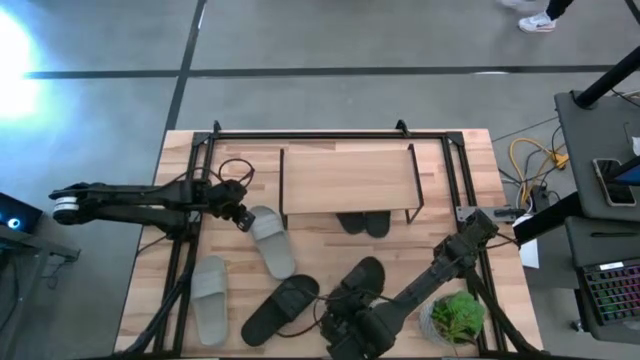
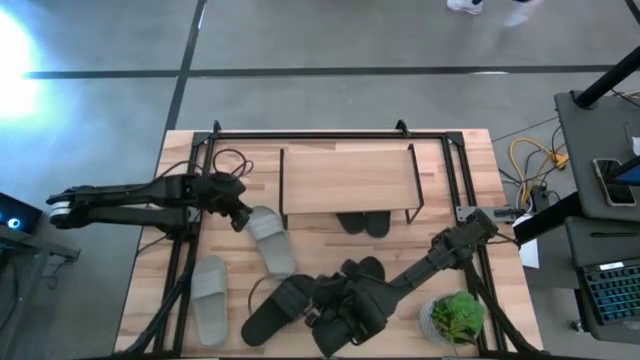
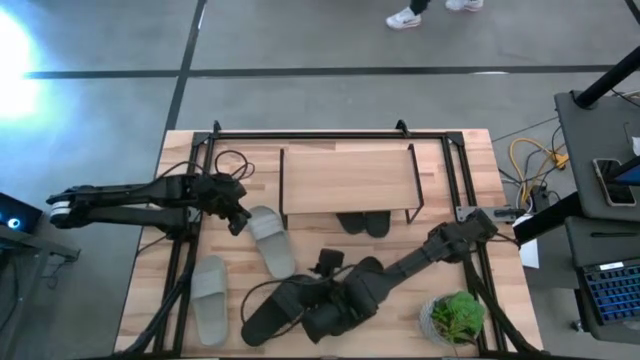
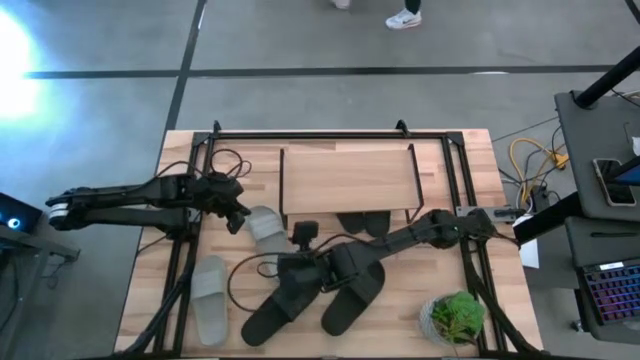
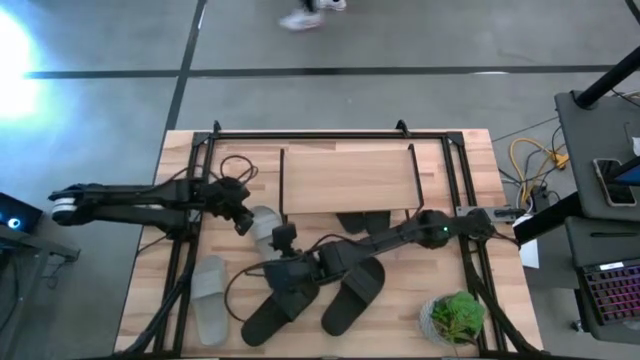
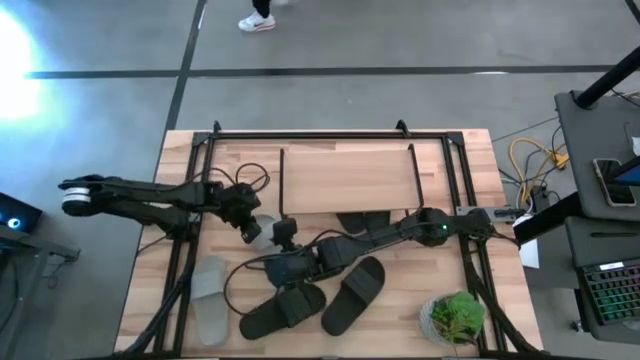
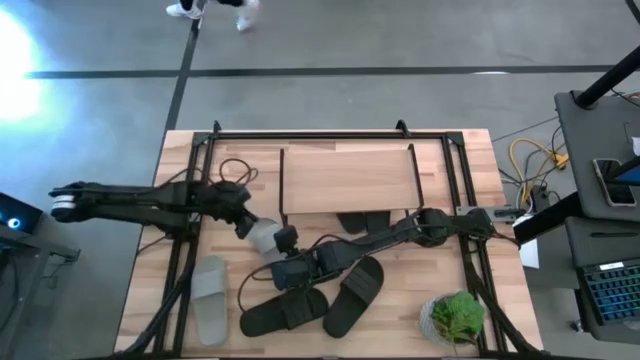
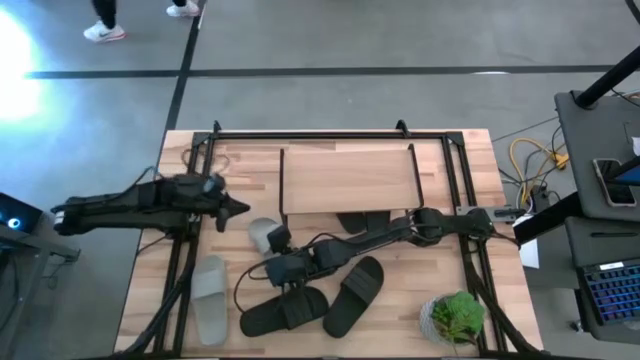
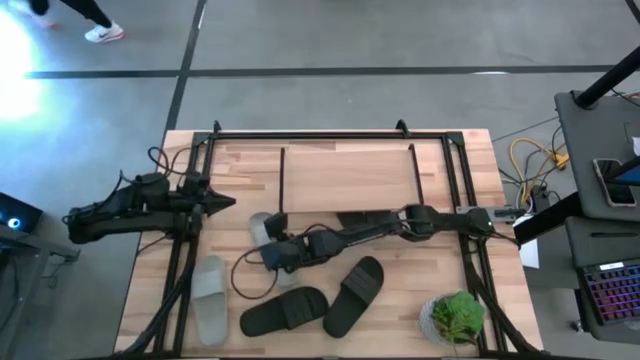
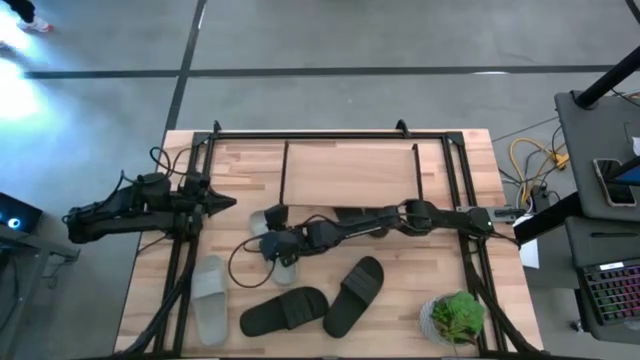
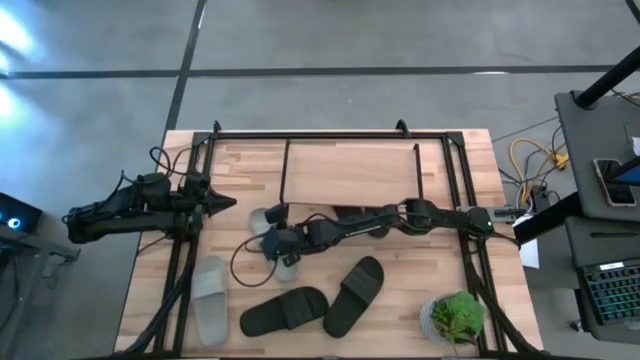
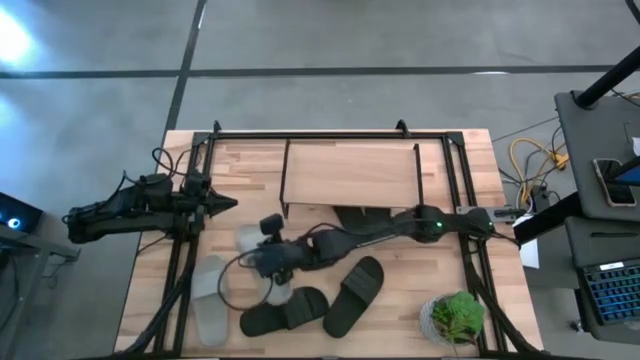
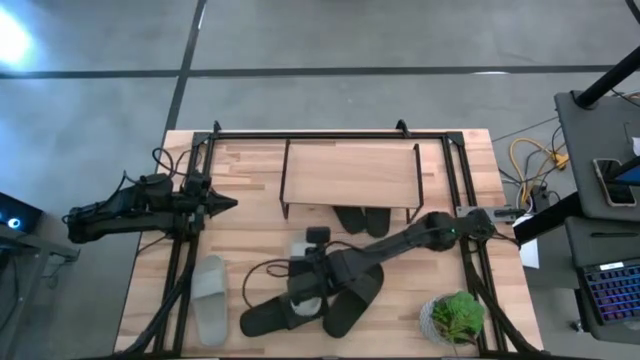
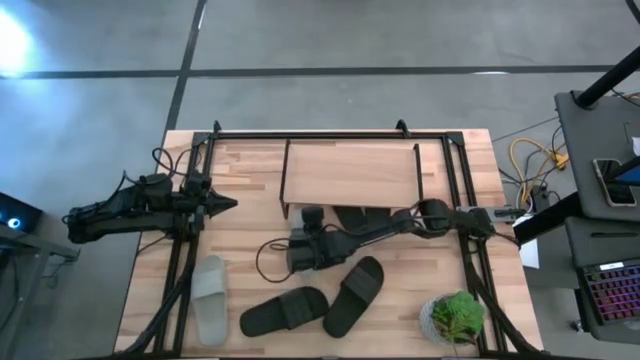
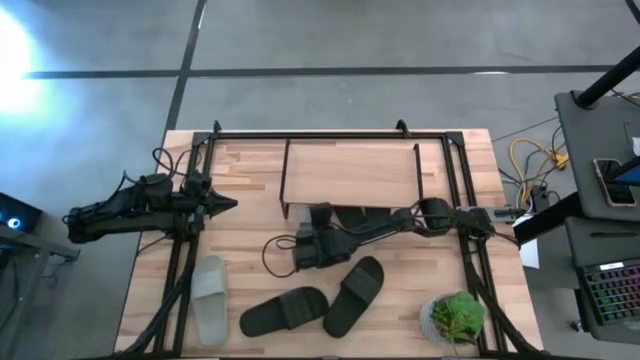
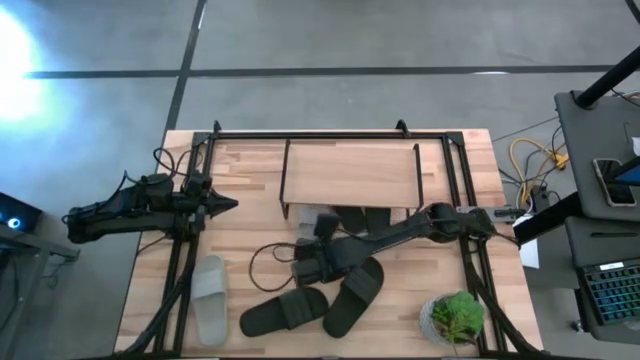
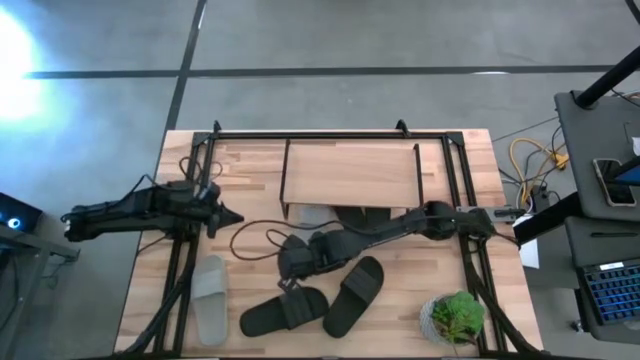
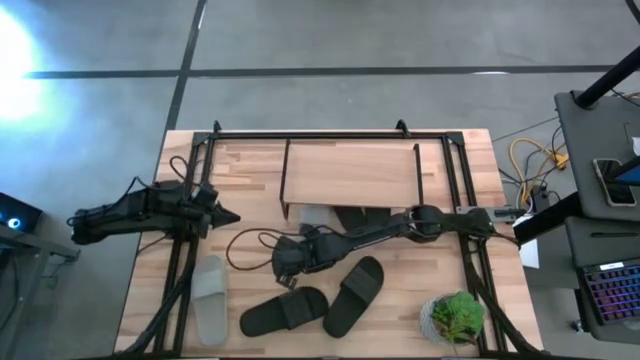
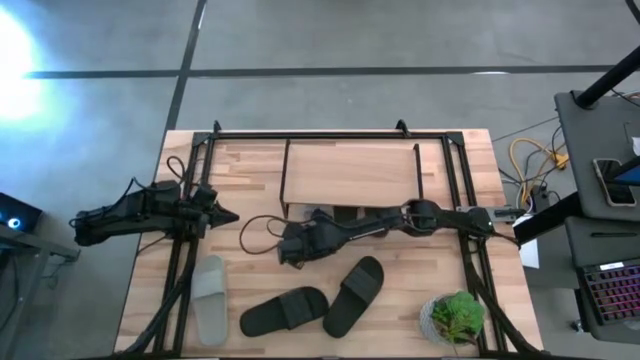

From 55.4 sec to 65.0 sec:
Task: Pick and place slides into the shelf
Put the gray slipper under the shelf

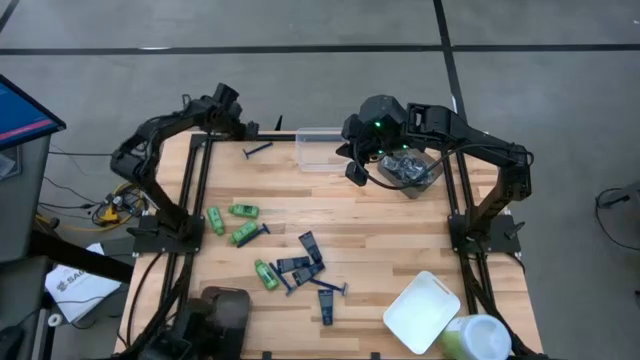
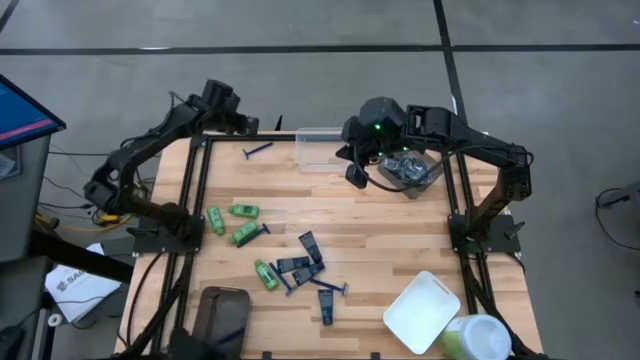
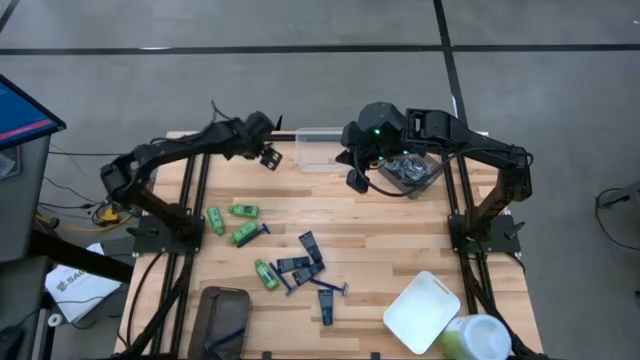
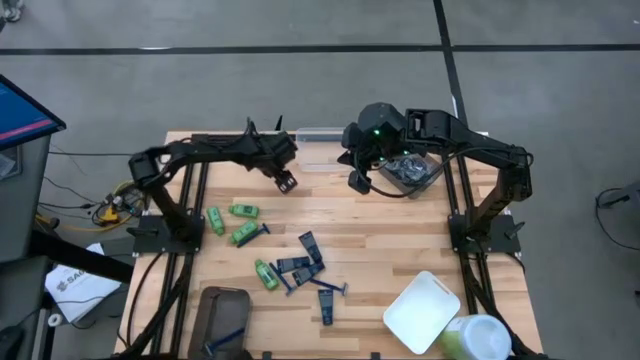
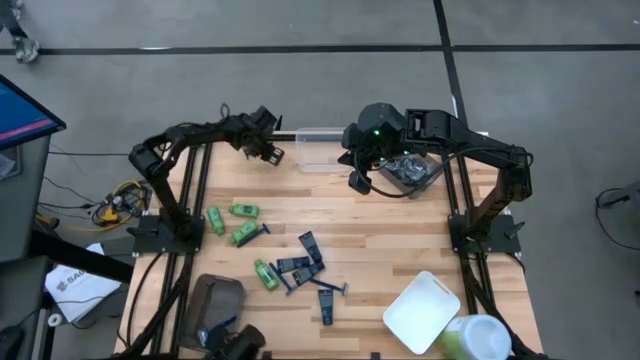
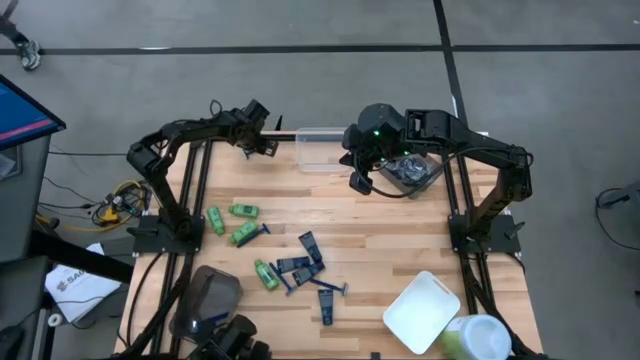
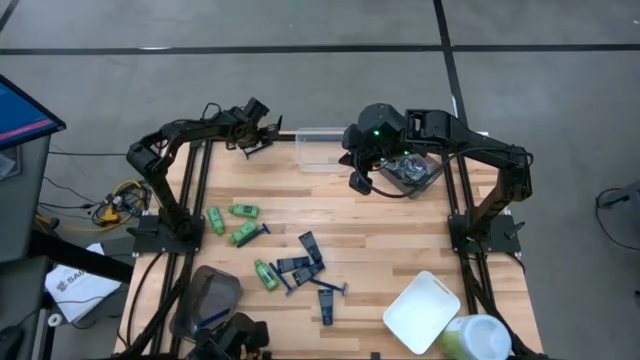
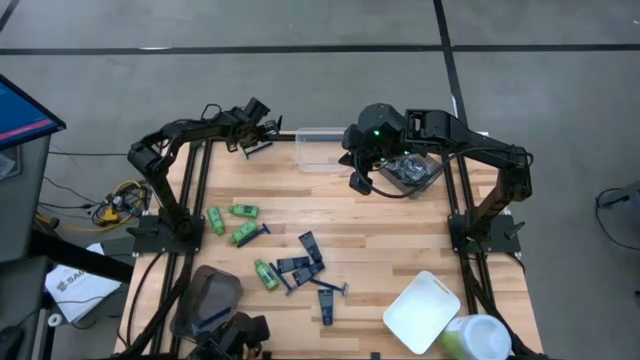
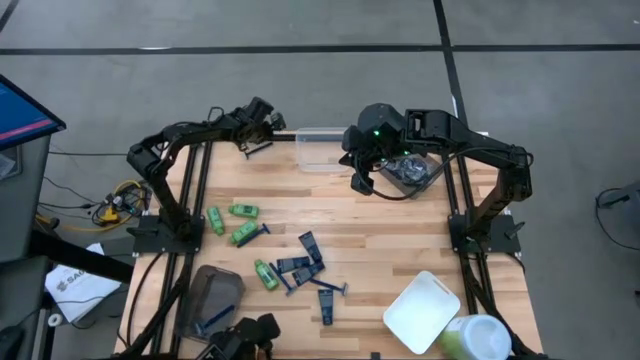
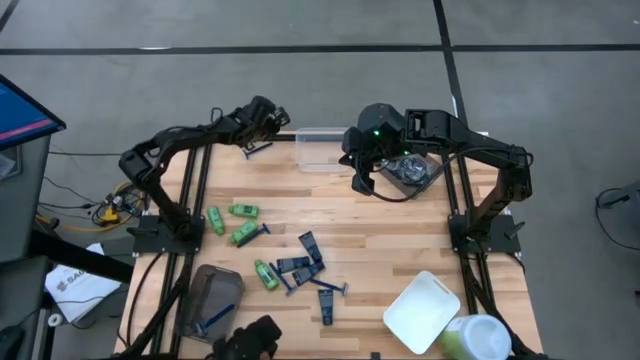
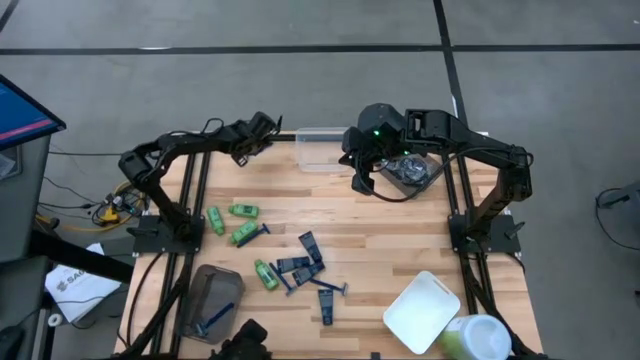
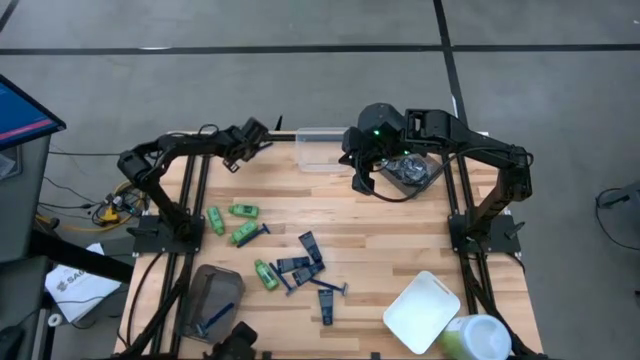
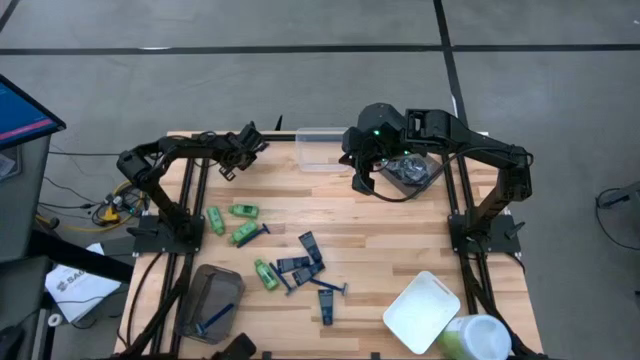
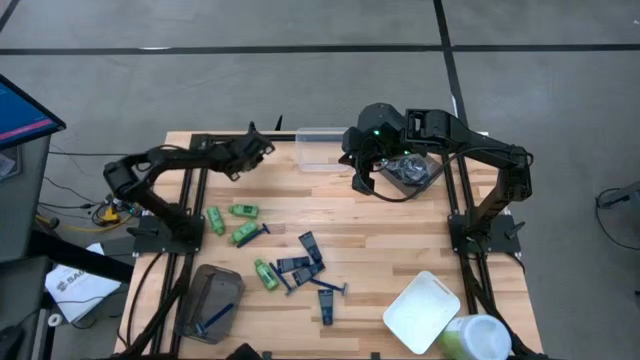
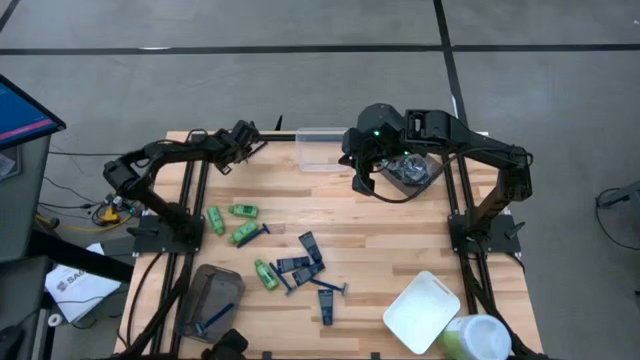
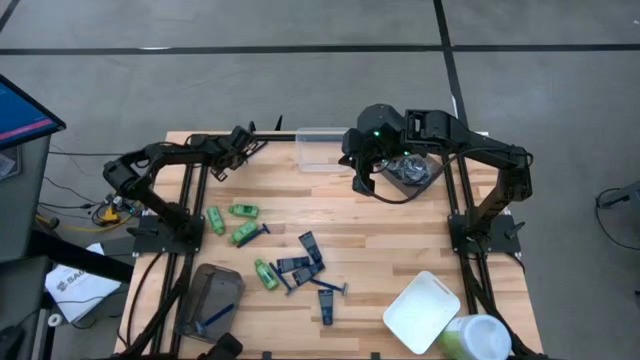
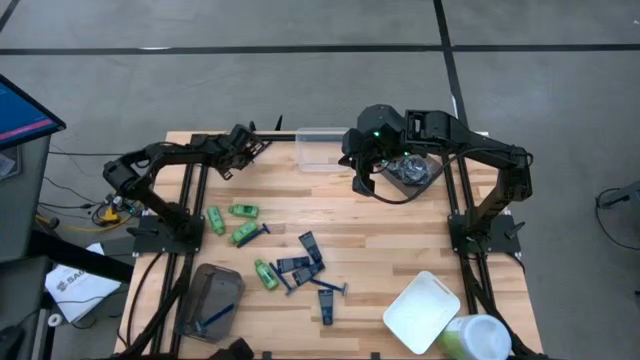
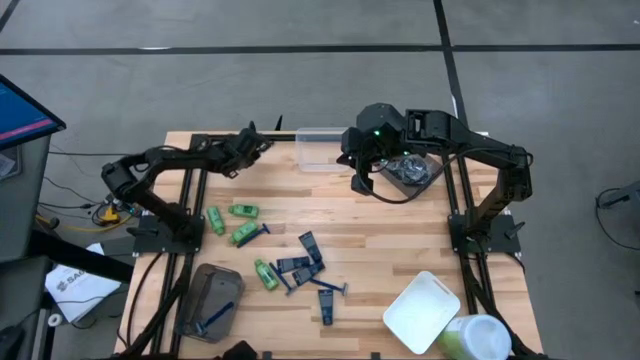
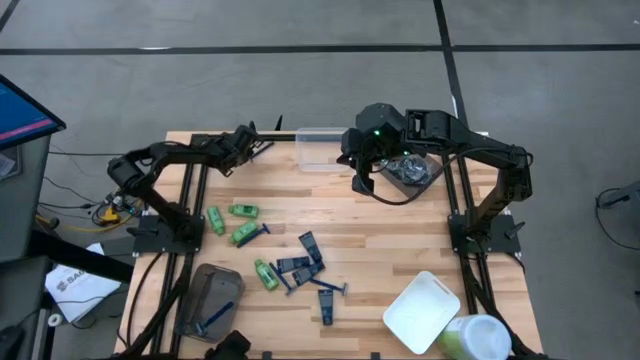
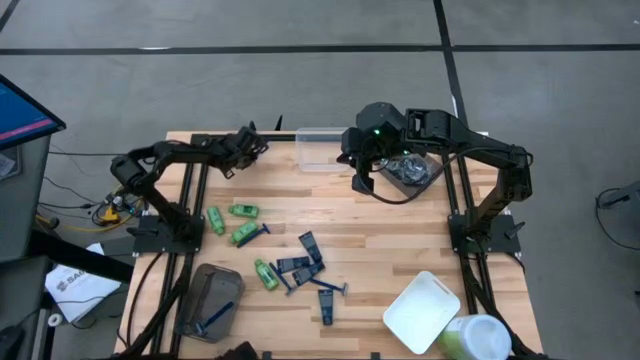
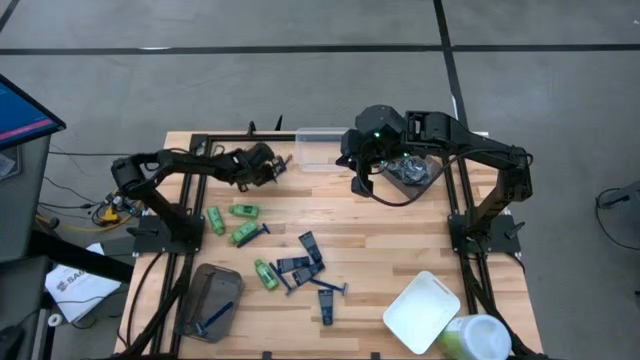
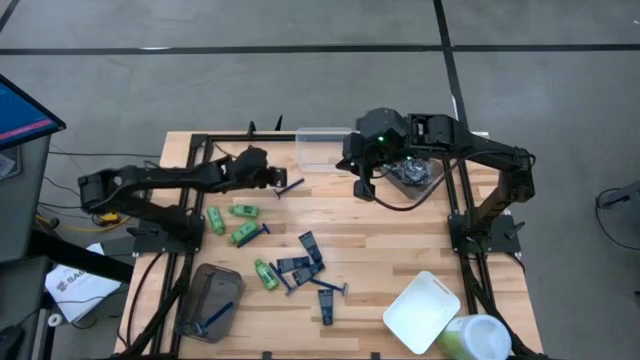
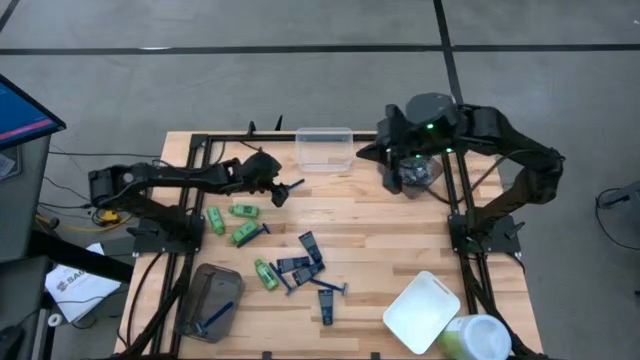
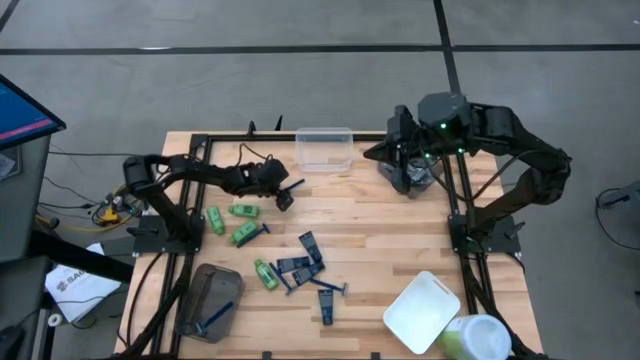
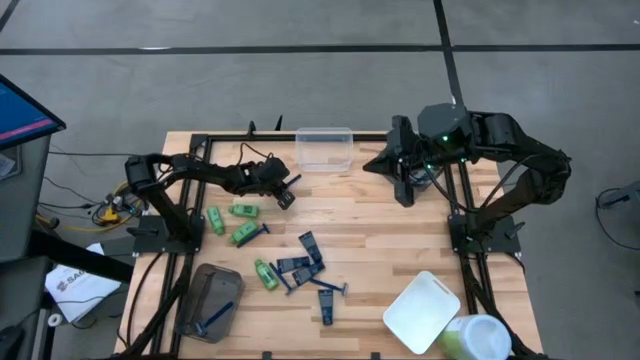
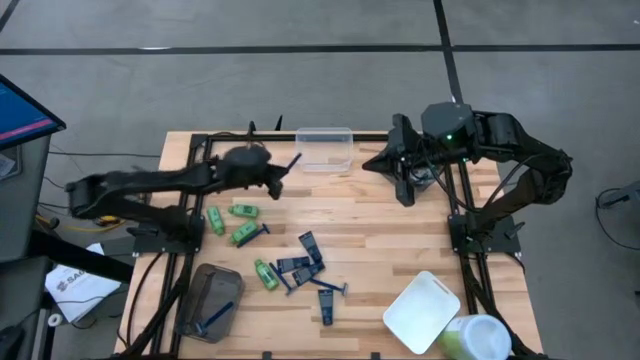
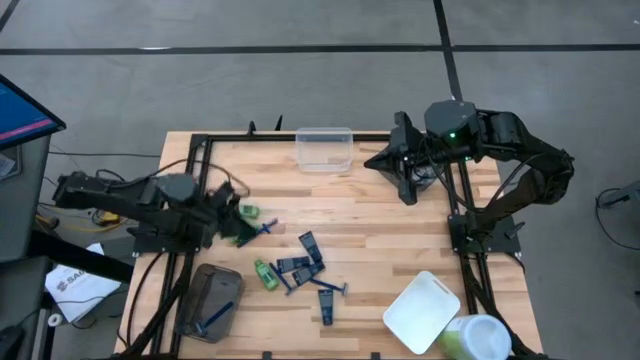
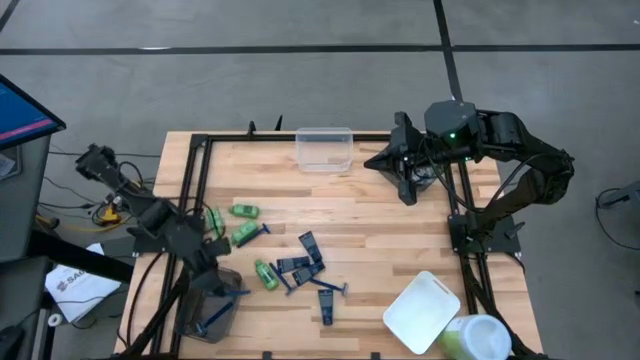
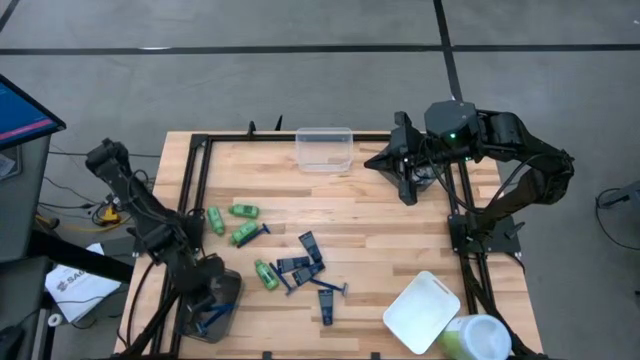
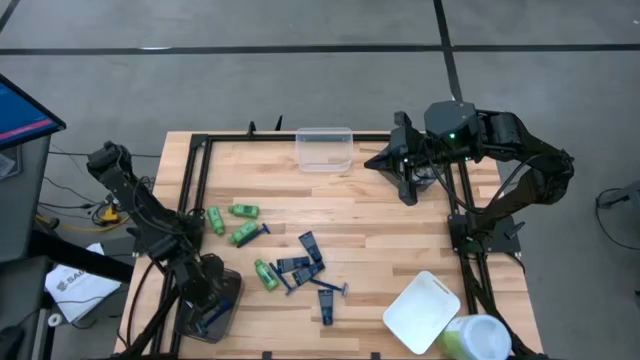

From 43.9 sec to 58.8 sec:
Task: Pick & Place Travel size toiletries
Put the blue razor into the bottom black bin
